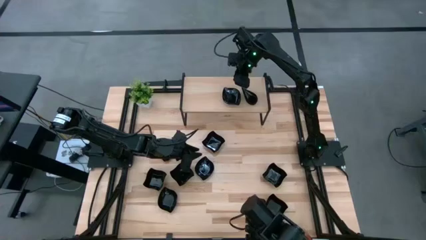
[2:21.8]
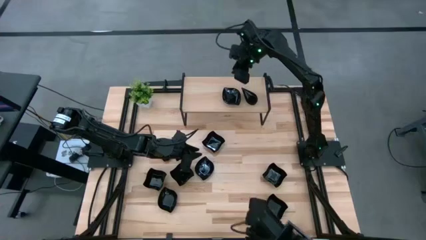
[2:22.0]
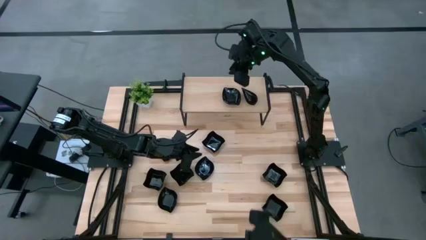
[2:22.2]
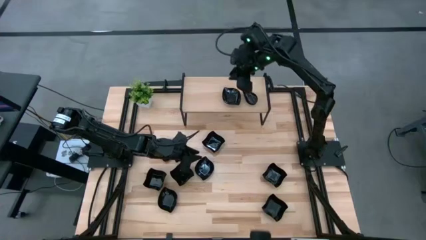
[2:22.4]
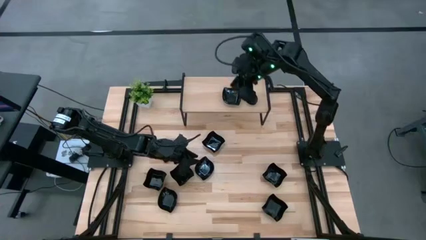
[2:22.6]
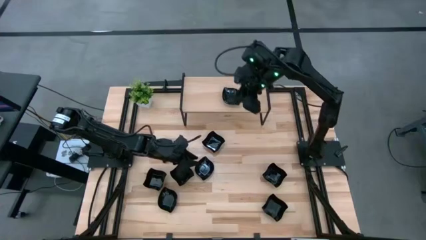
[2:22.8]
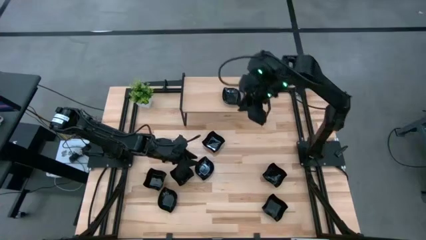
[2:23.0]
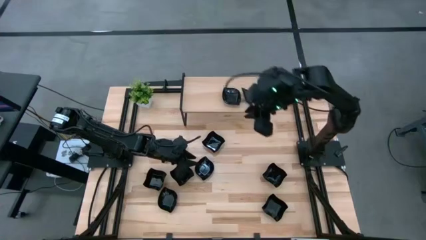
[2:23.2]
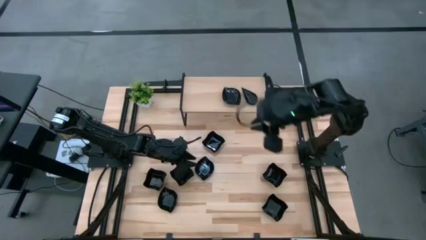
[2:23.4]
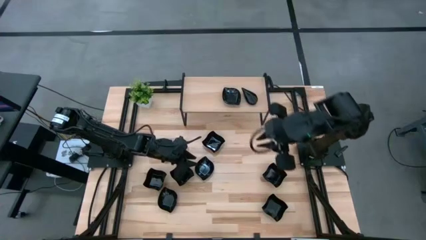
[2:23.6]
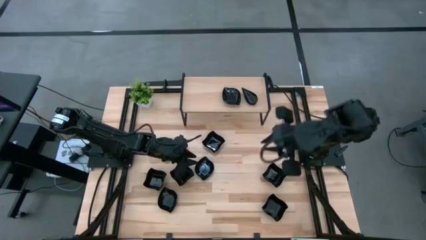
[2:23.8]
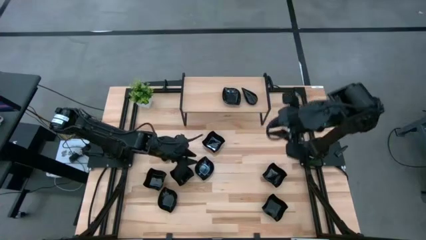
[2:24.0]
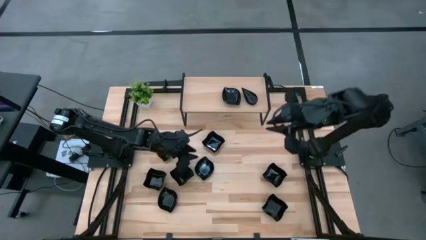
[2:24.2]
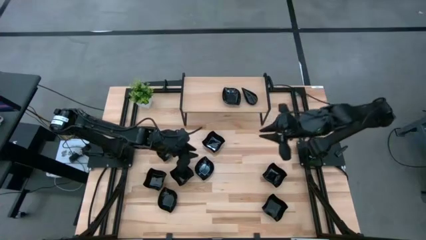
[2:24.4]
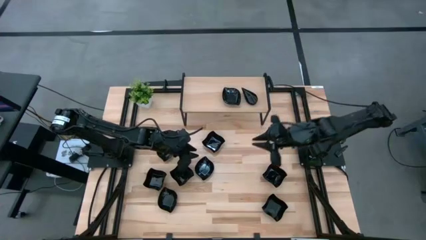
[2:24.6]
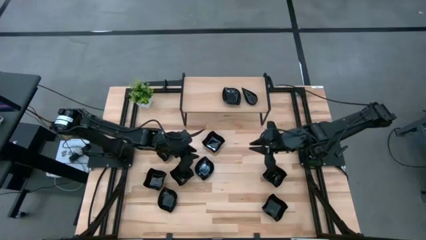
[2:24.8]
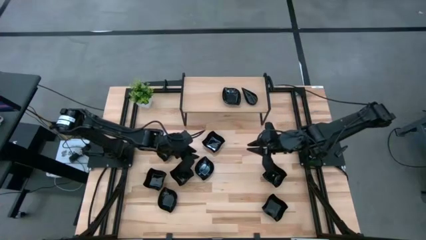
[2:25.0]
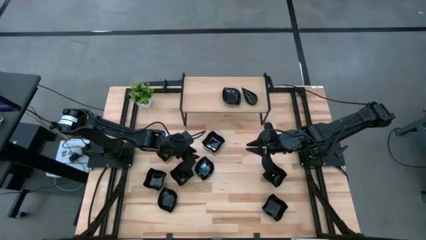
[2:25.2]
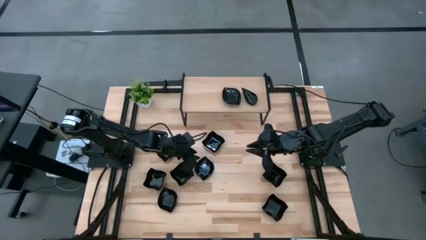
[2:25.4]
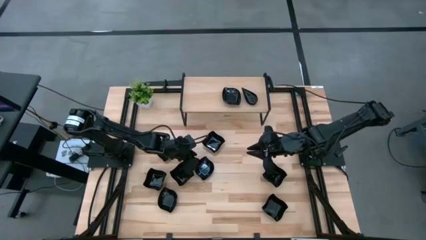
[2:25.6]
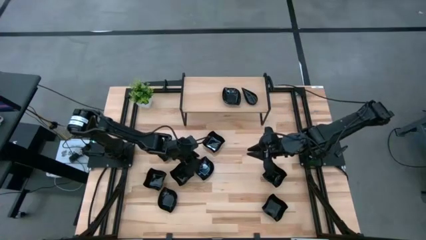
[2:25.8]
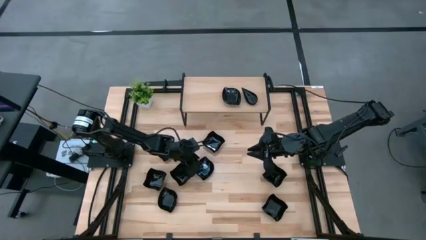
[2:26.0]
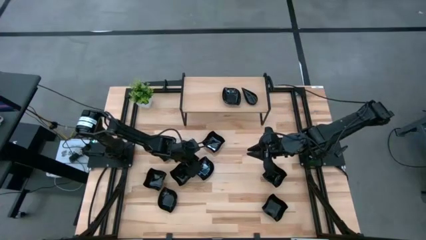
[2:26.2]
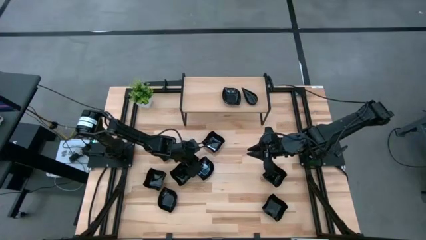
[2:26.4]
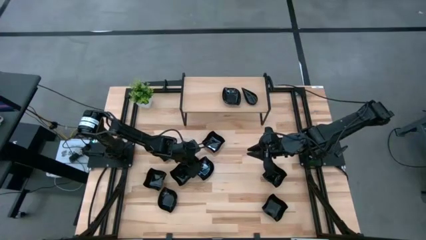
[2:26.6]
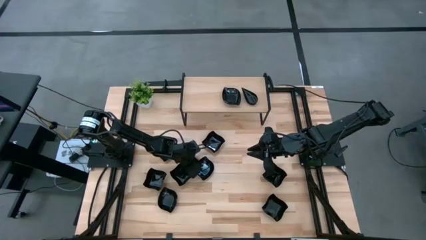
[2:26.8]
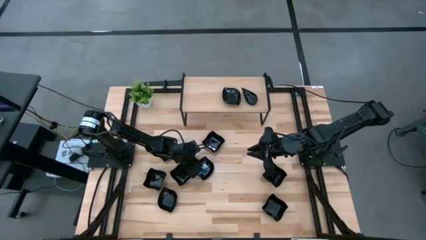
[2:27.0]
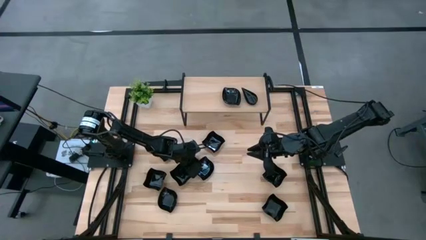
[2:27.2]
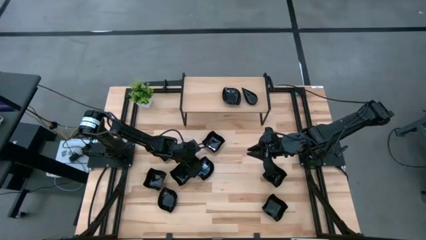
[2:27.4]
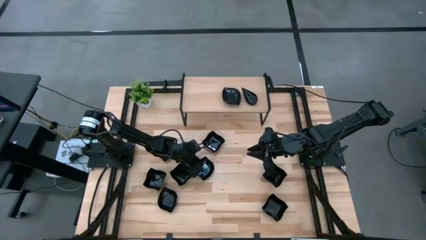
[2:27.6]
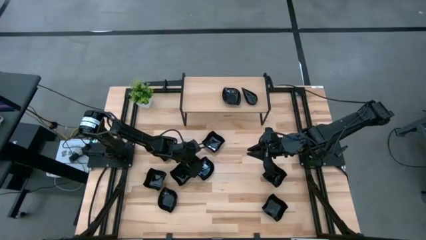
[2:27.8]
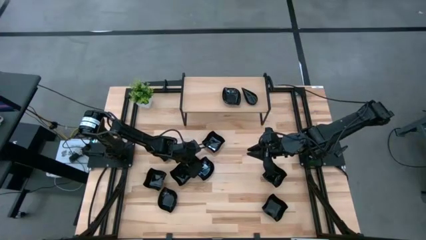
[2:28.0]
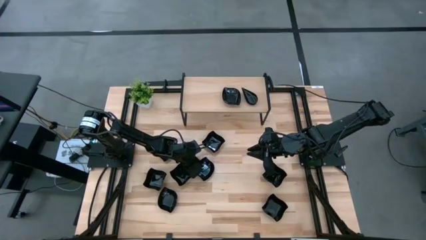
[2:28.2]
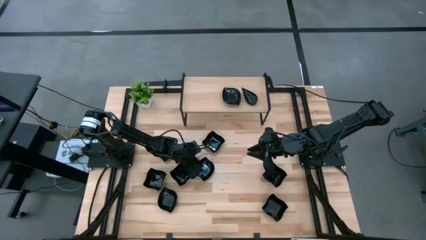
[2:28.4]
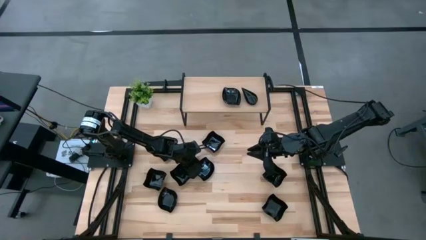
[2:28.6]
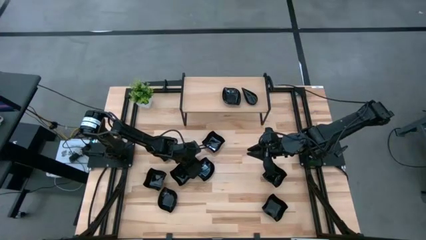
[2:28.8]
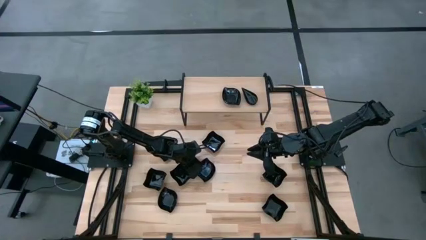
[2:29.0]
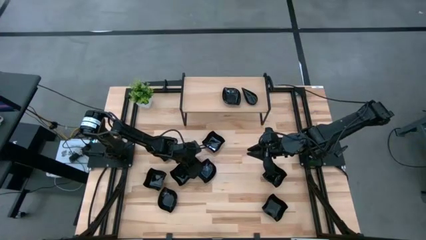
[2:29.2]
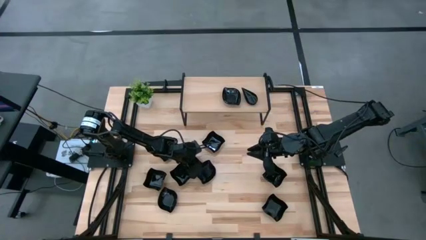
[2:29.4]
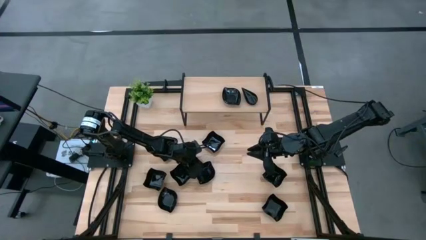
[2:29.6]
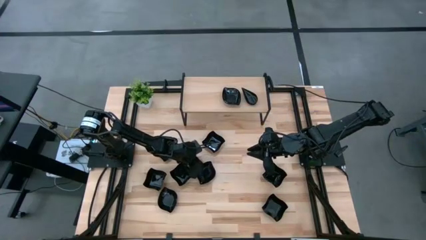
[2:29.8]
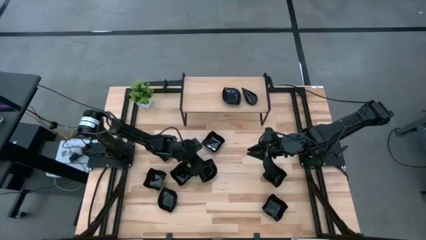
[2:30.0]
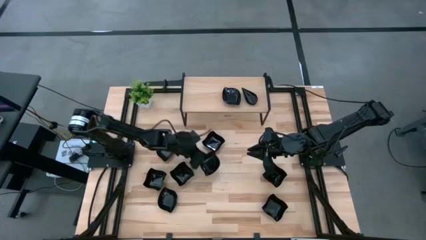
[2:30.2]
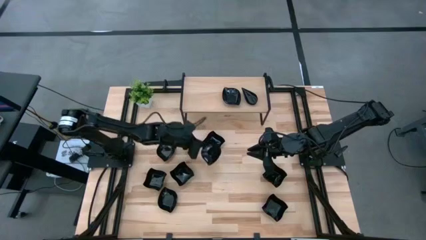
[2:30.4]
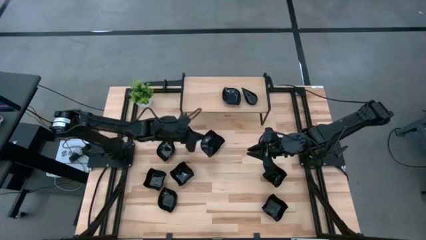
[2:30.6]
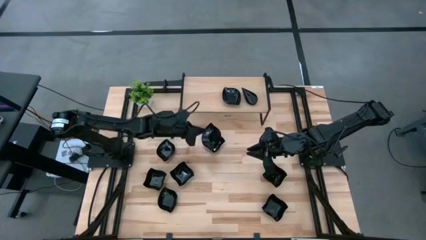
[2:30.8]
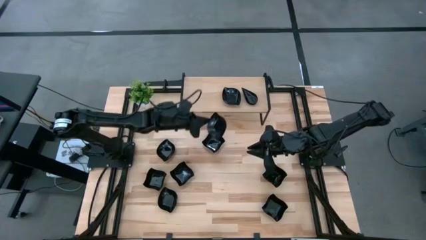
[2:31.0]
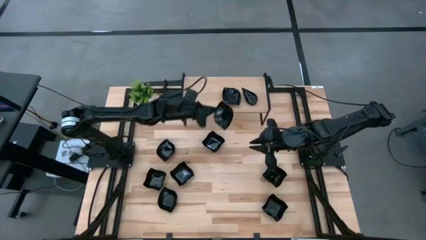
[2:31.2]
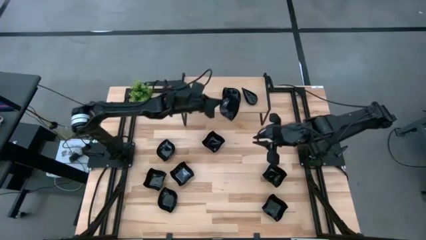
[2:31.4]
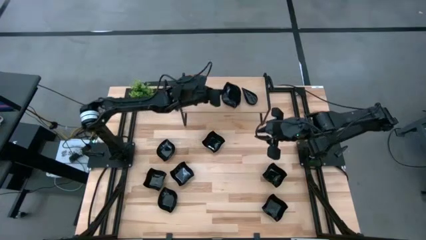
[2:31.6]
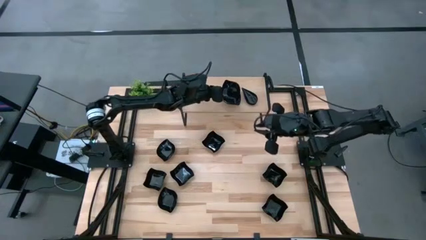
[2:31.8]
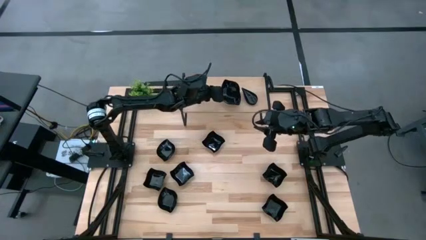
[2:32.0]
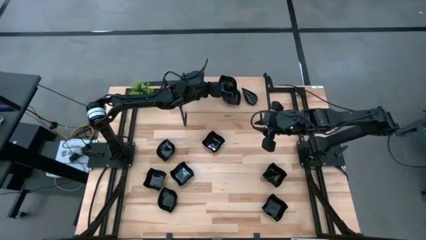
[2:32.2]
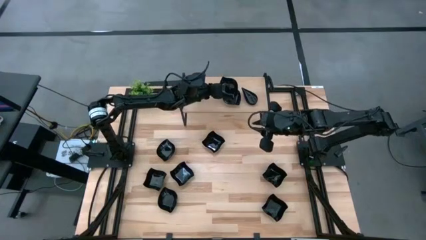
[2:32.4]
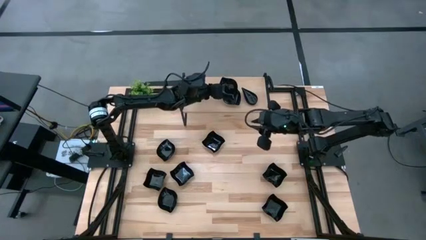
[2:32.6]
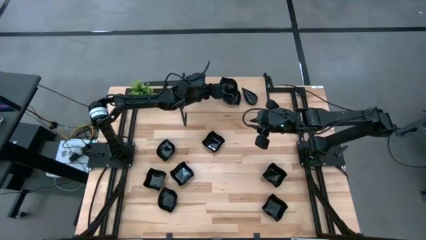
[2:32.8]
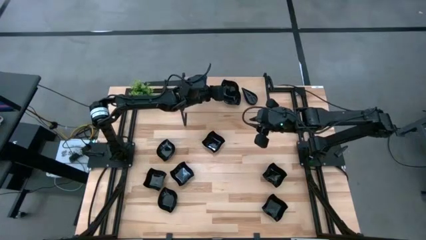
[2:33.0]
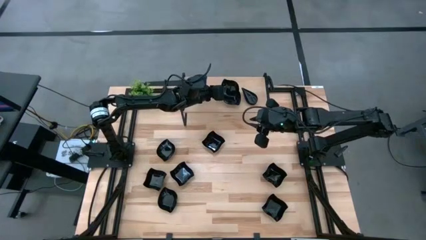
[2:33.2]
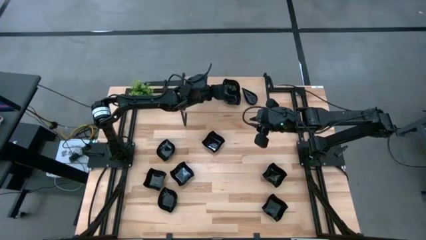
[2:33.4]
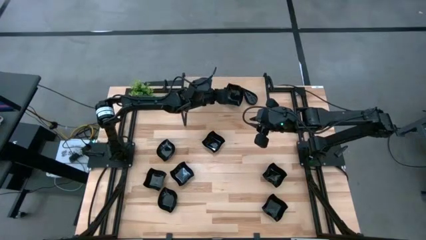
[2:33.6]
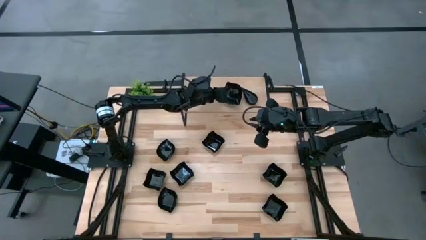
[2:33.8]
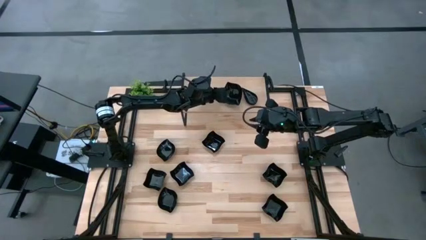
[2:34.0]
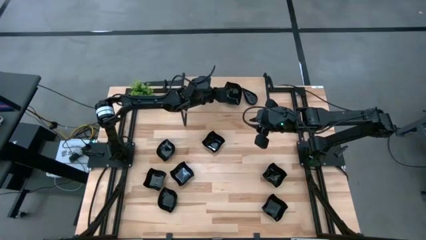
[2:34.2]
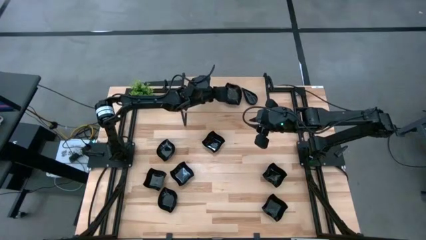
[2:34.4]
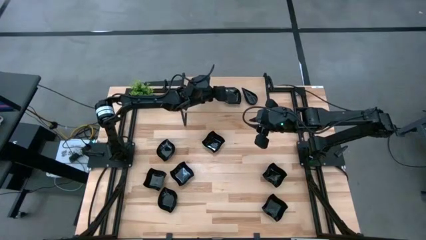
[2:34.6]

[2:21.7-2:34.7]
Task: Pick & Place Mini shaped plates
Stack the black leaf shaped plate on top of the black leaf shaped plate on the shelf
